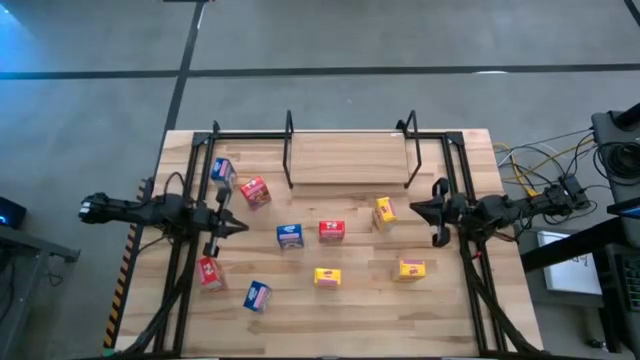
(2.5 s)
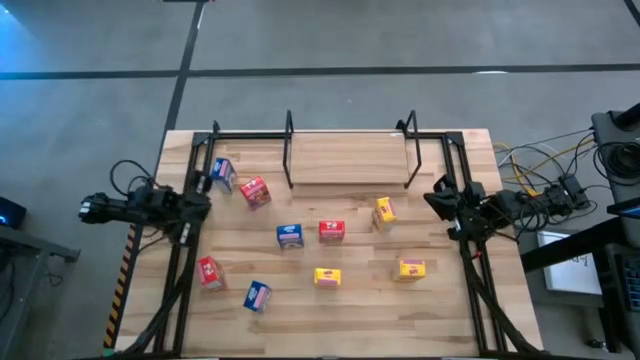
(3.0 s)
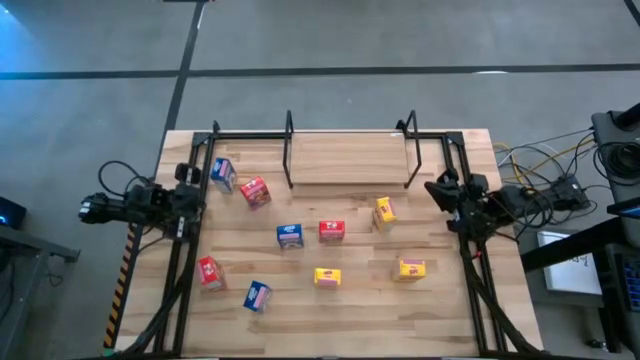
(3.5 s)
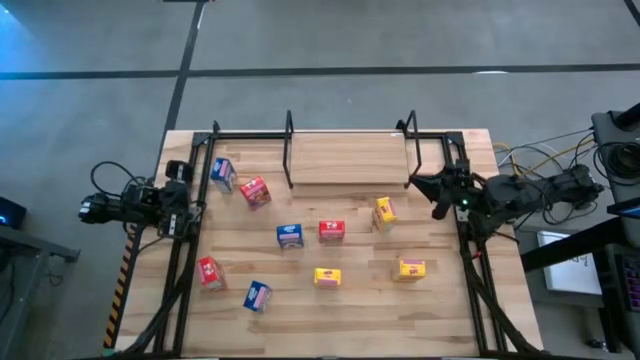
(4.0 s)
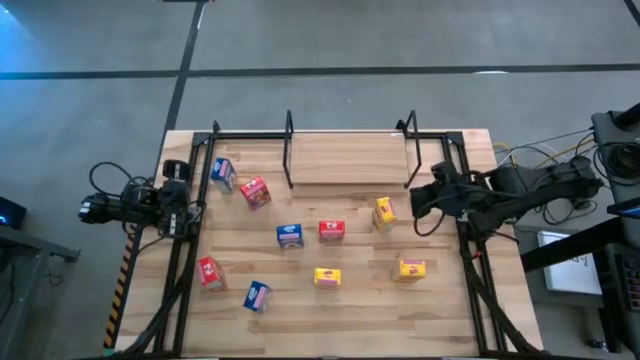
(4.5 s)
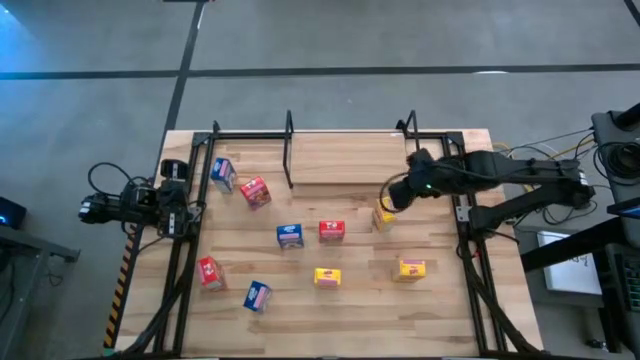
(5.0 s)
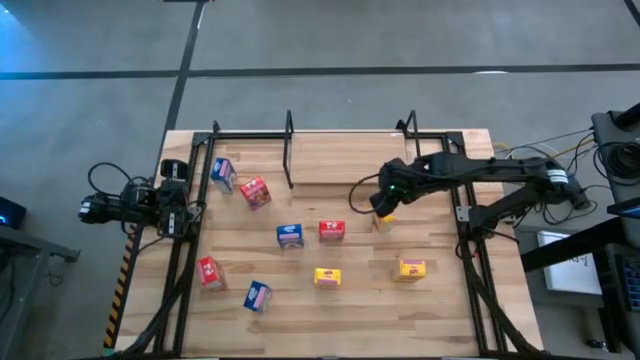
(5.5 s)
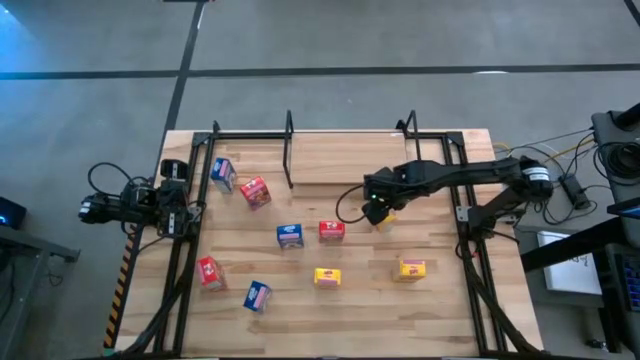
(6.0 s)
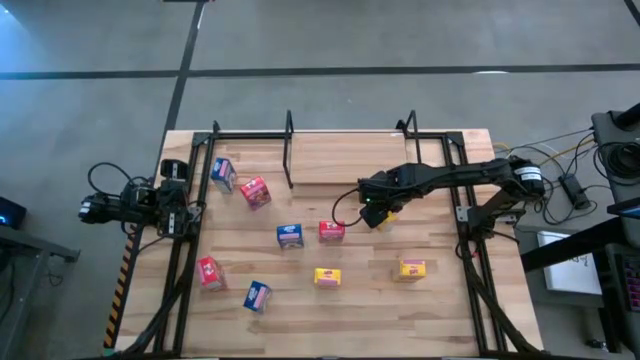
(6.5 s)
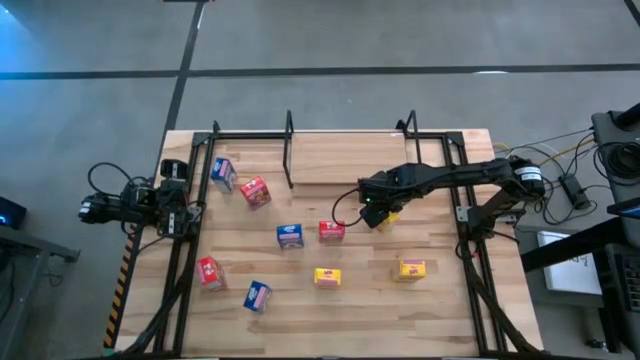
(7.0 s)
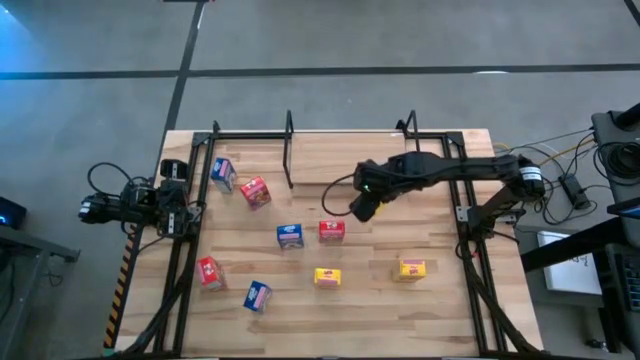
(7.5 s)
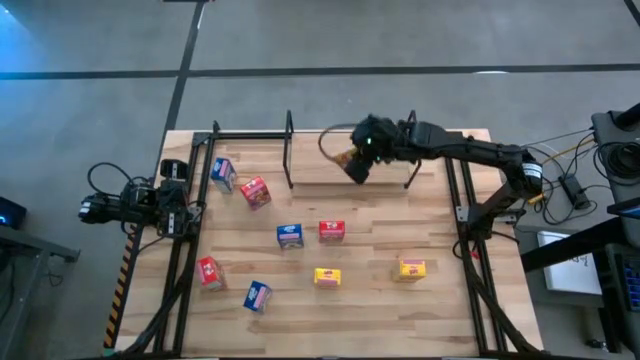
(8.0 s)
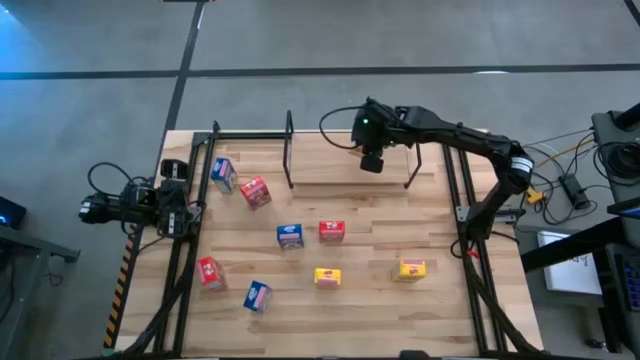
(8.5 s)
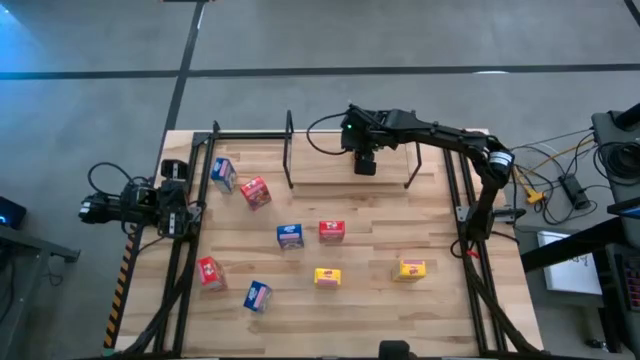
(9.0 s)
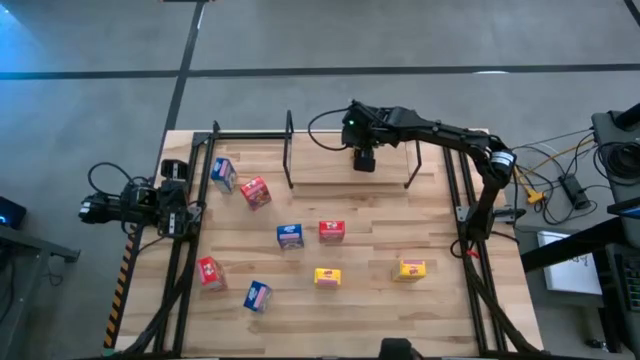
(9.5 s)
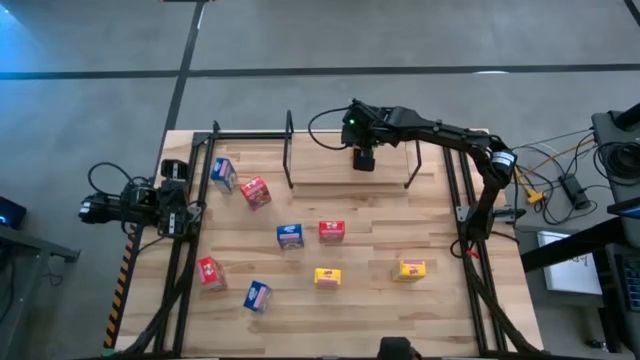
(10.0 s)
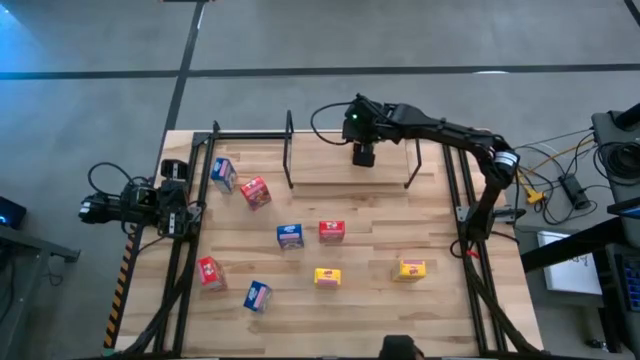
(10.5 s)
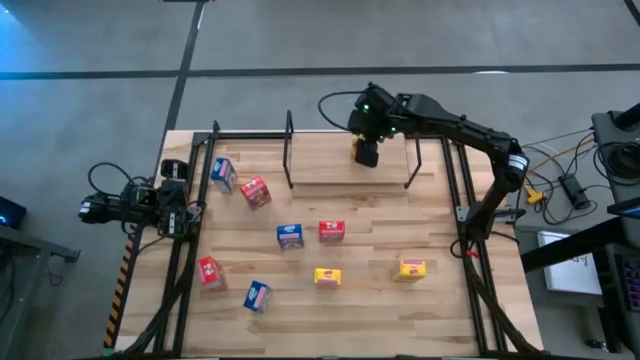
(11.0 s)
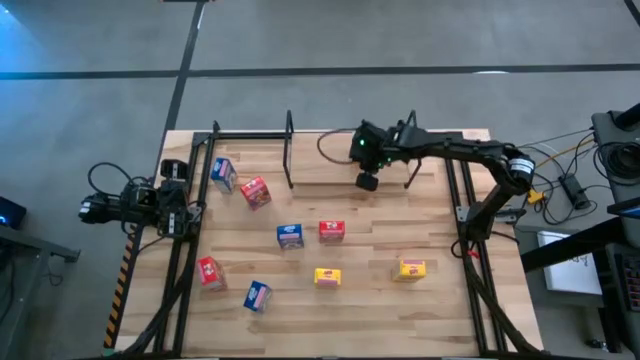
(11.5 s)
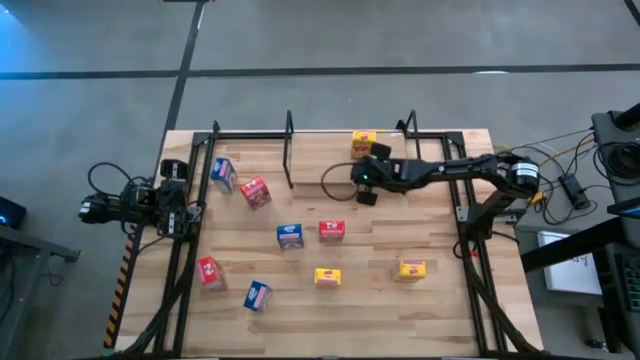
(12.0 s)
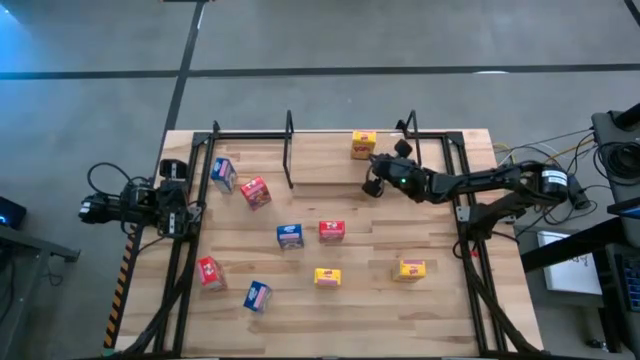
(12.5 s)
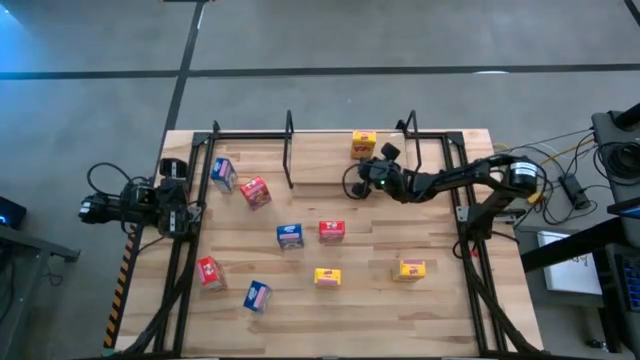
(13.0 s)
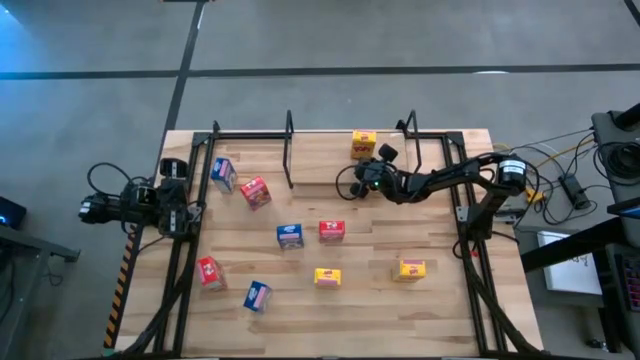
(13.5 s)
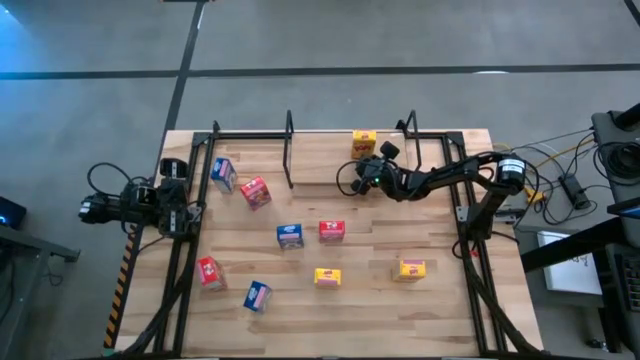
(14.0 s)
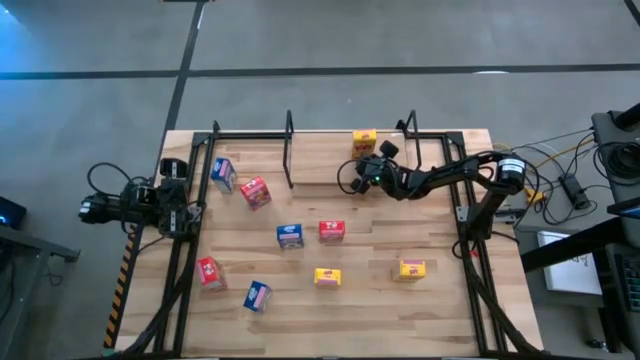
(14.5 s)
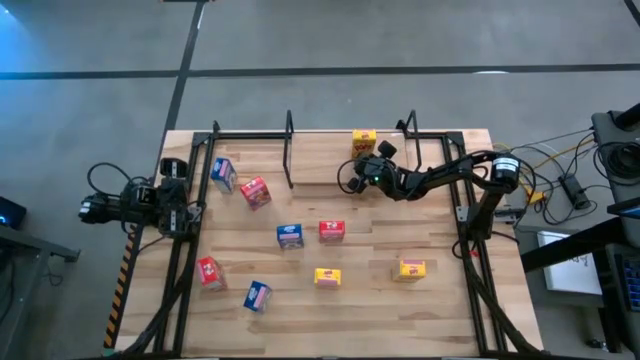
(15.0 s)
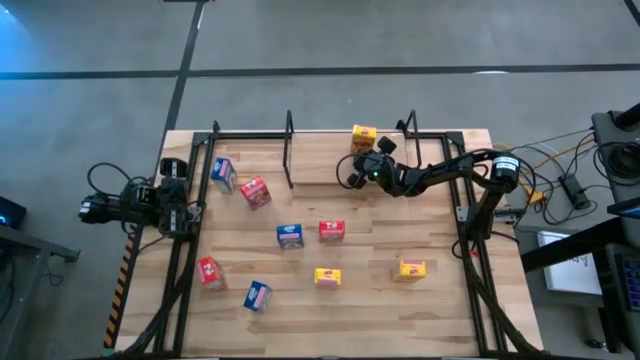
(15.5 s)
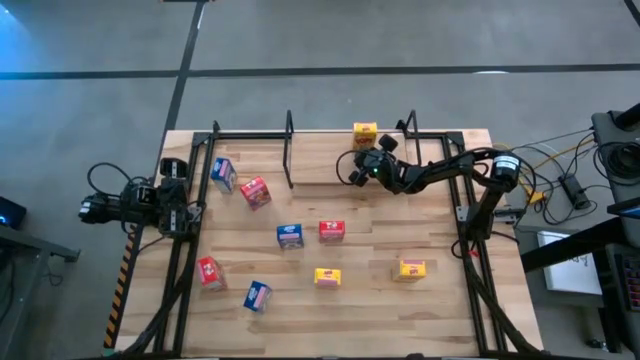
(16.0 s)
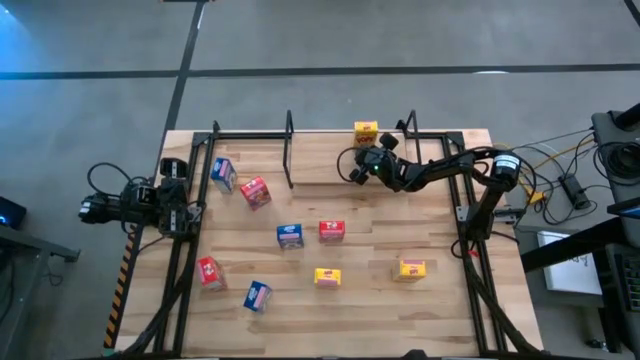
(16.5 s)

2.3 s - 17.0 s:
Task: Stack cereal on shelf
Put the top yellow cereal box on the shelf

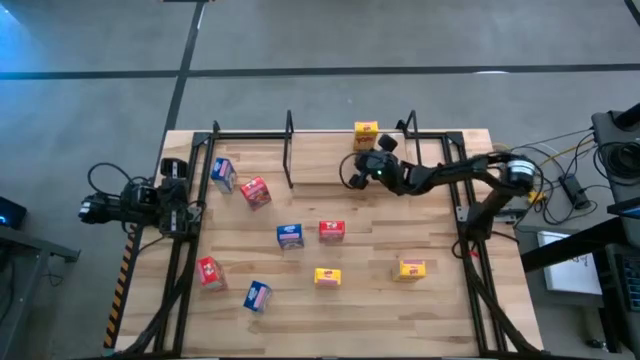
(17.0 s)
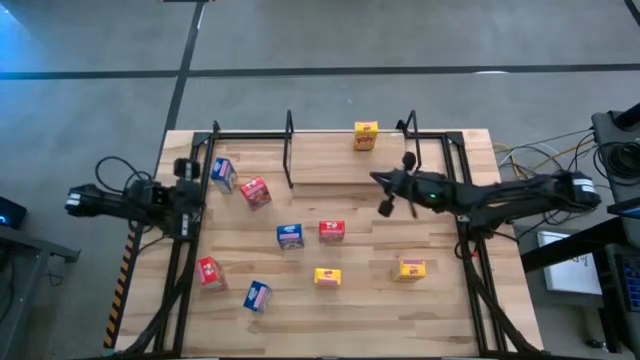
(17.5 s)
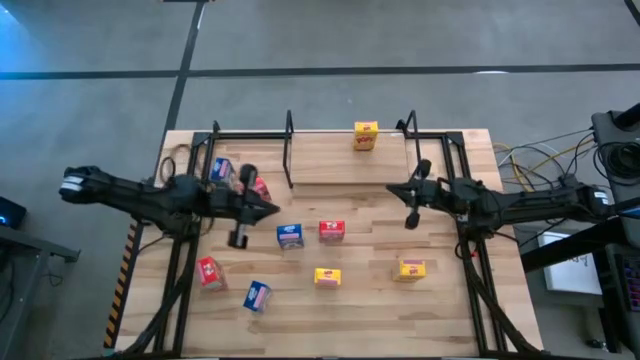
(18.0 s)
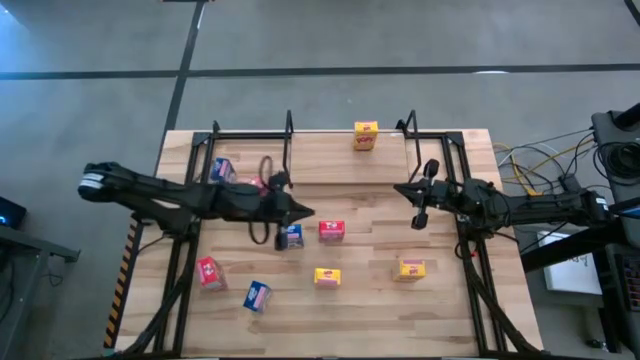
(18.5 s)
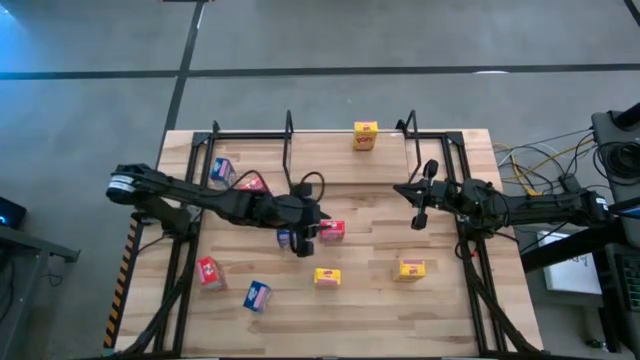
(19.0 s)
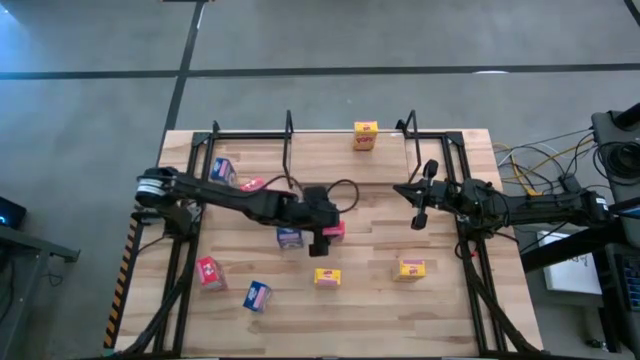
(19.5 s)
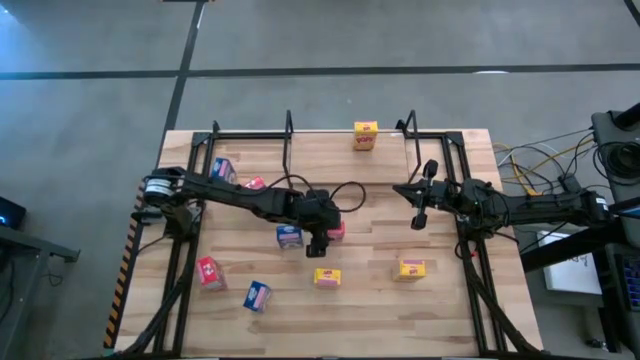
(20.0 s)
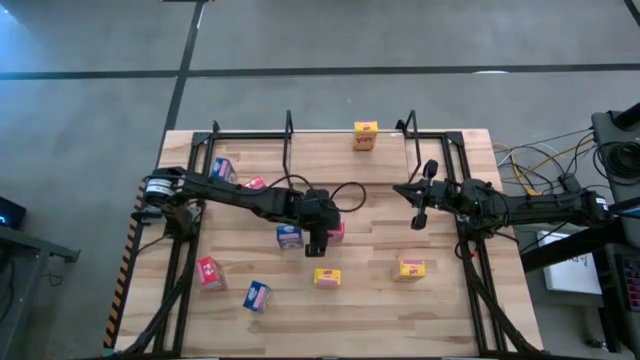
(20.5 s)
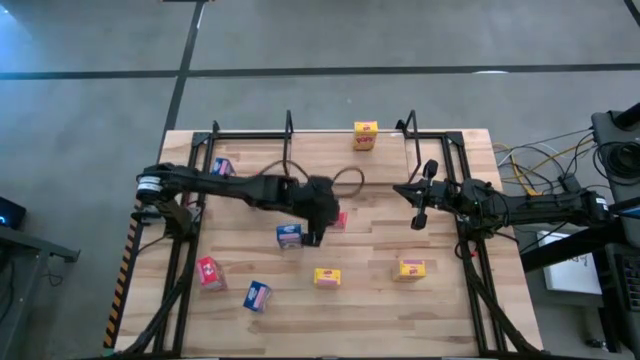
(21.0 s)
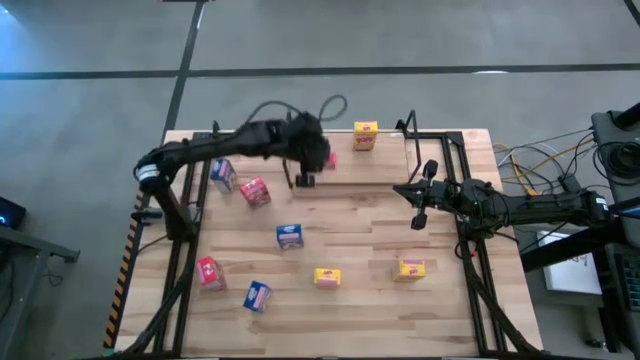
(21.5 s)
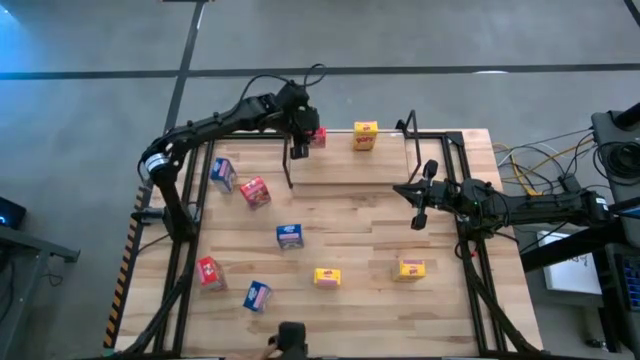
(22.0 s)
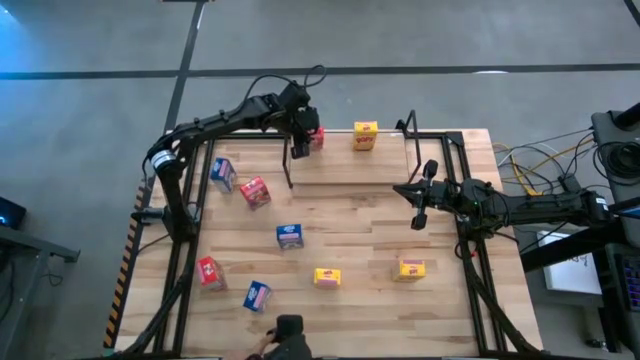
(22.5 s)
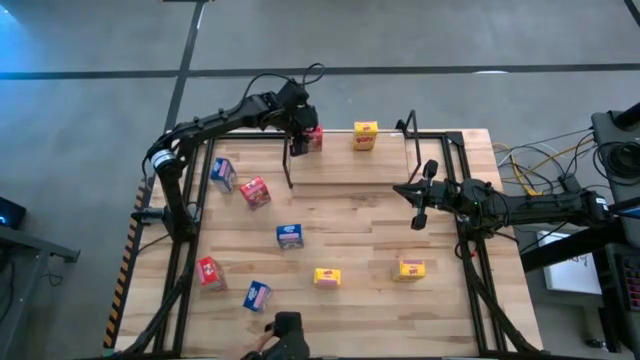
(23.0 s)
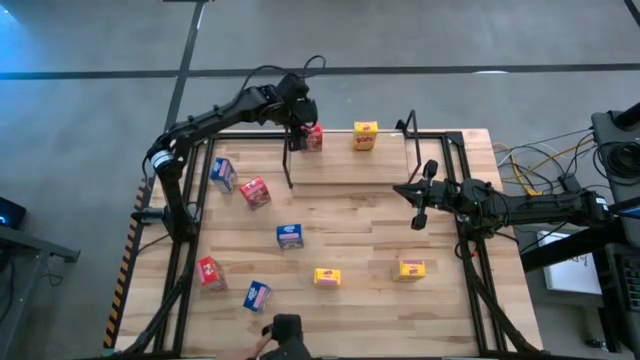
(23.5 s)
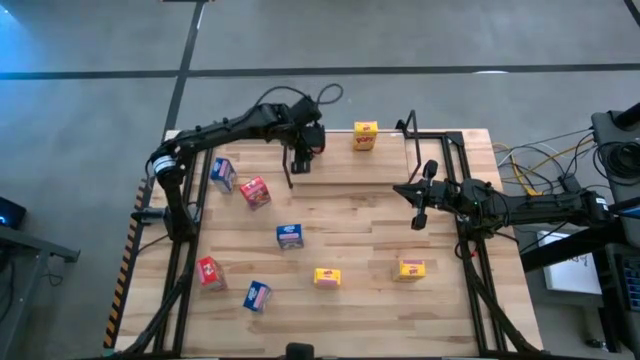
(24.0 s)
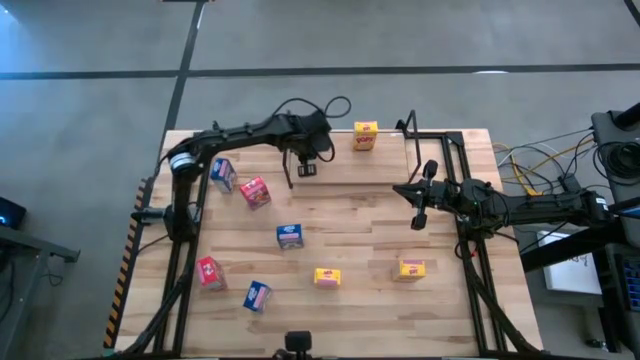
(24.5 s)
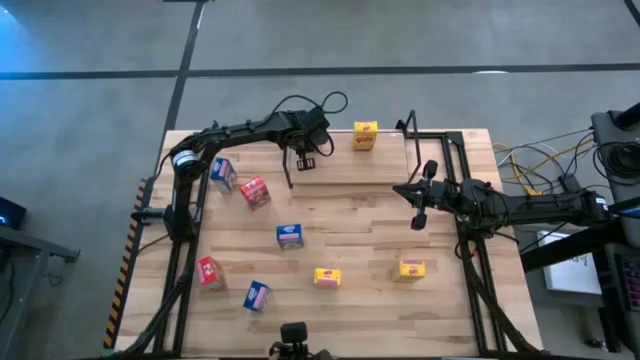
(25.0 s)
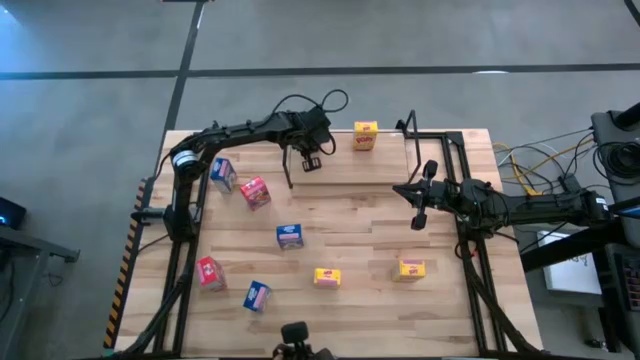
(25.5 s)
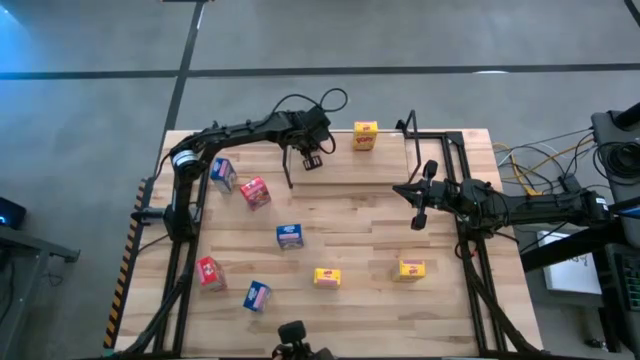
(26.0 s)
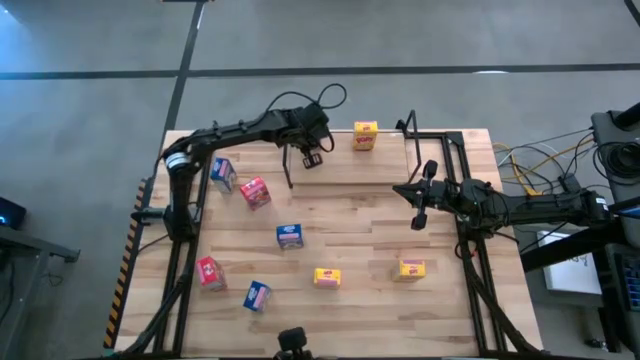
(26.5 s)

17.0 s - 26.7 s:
Put the right red cereal box on the shelf
